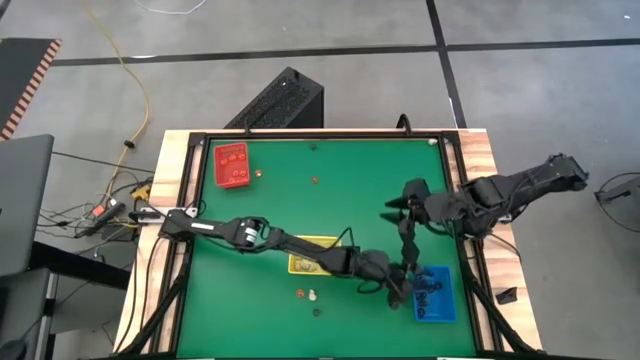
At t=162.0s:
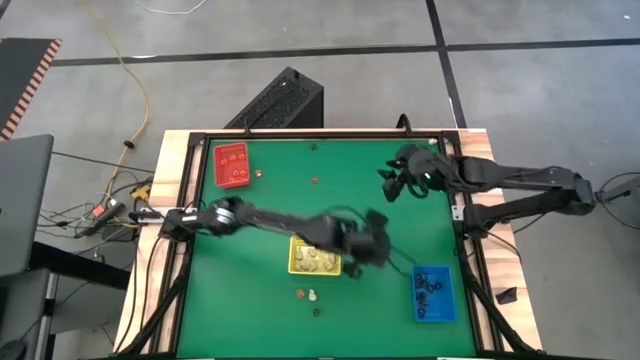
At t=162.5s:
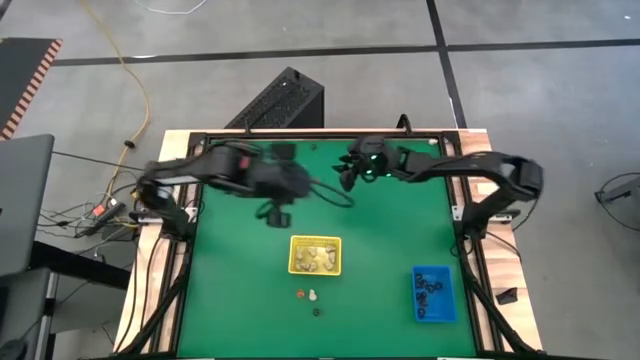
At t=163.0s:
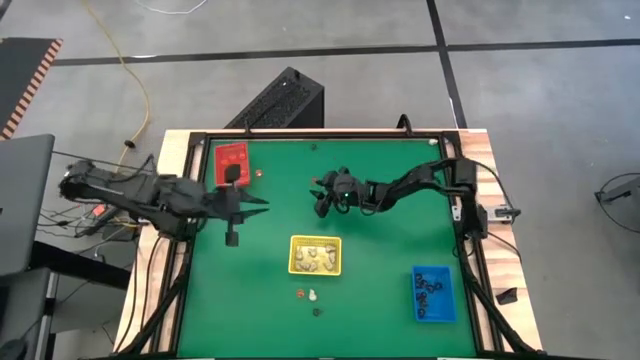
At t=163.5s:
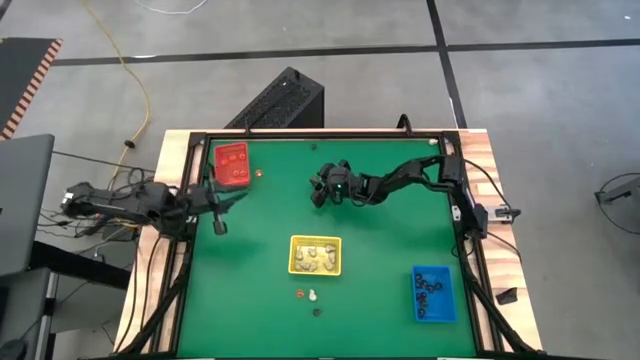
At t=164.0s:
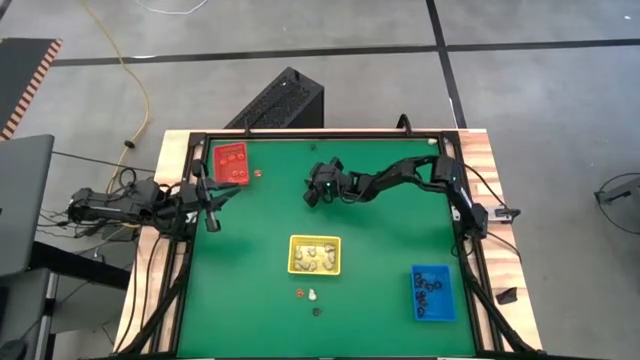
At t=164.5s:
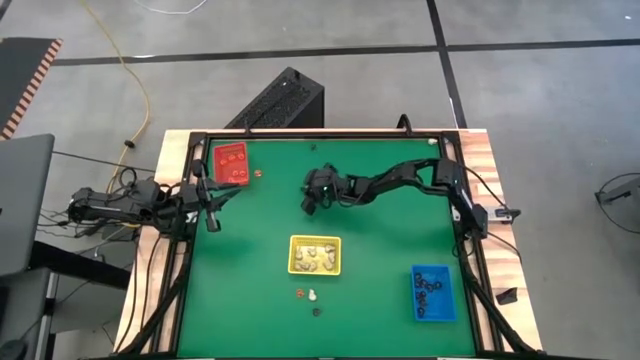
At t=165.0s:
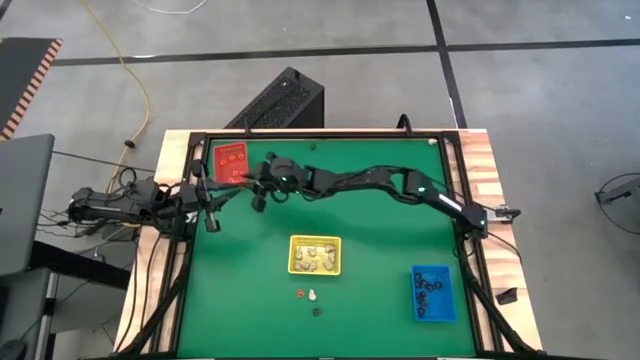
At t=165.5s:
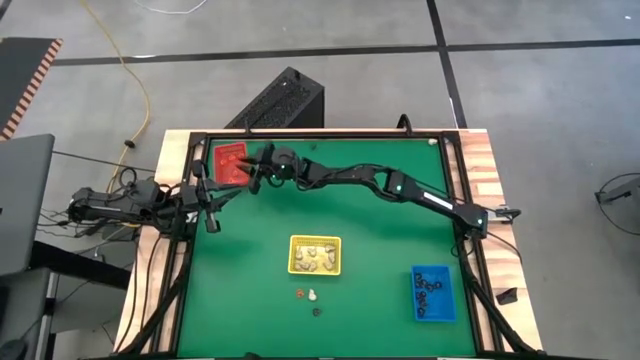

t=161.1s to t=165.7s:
Task: Sort Halloween decoration
Put the orange pumpkin toy into the red bin

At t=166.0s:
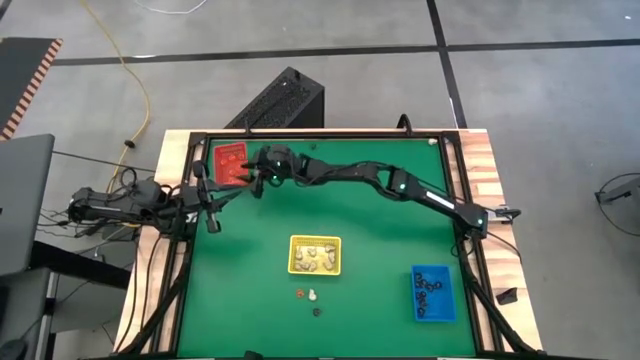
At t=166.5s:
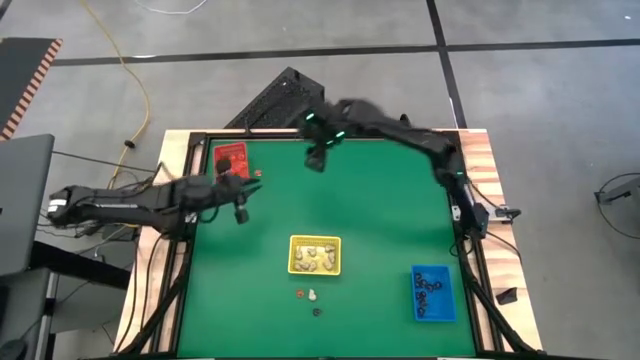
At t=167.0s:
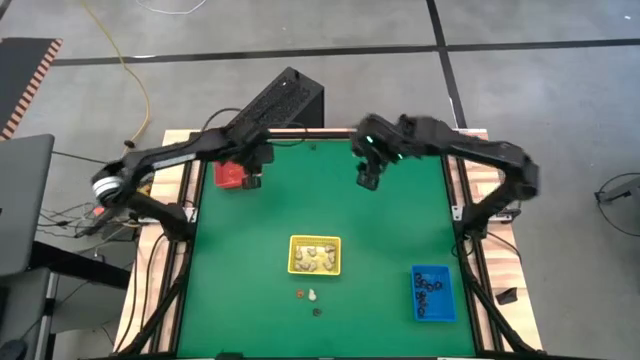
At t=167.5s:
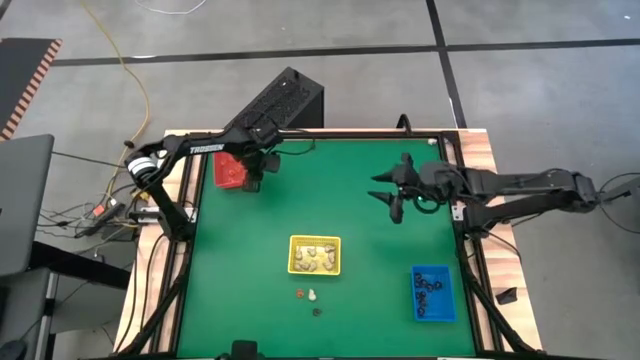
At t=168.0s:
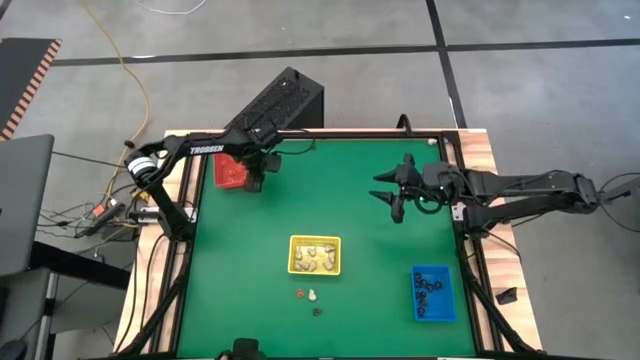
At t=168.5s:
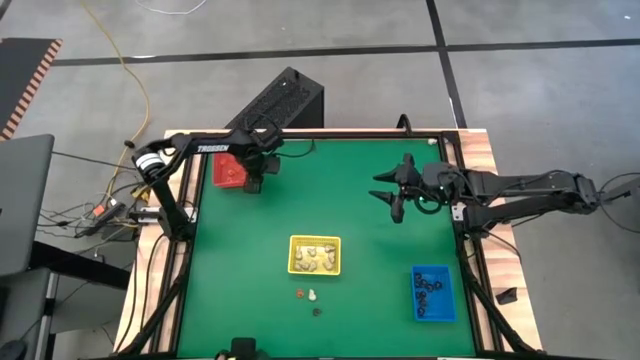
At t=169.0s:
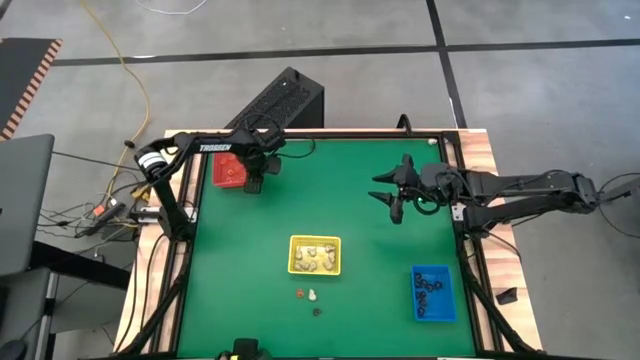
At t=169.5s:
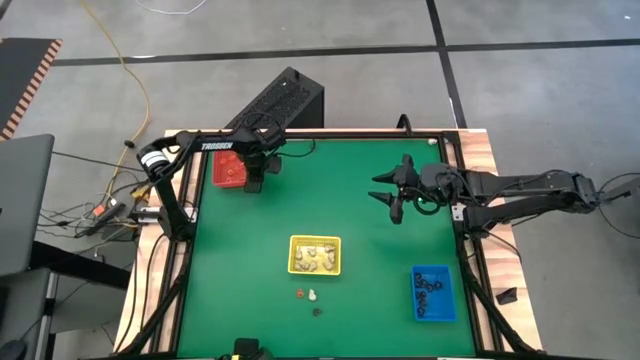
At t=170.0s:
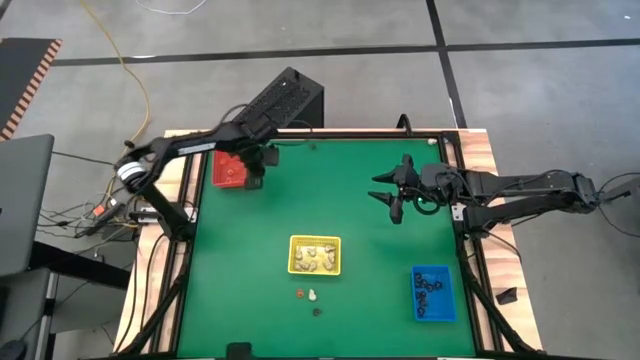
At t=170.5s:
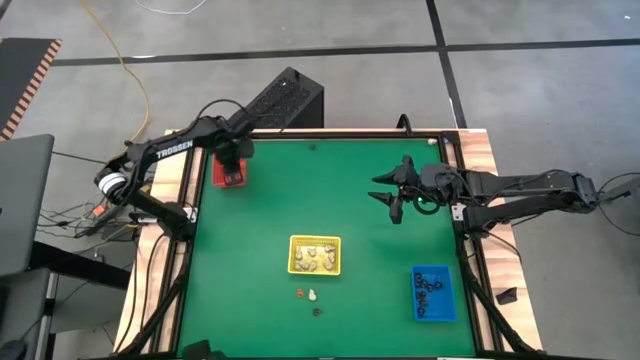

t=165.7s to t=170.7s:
Put the orange pumpkin toy into the red bin

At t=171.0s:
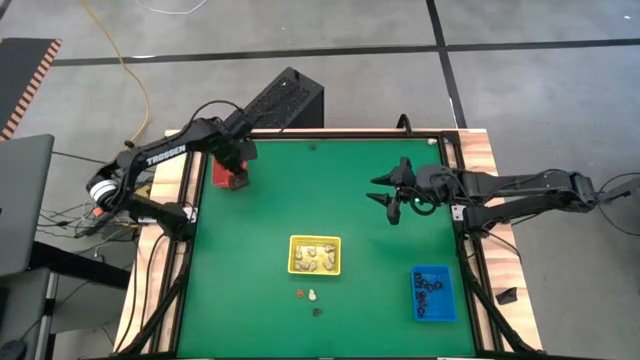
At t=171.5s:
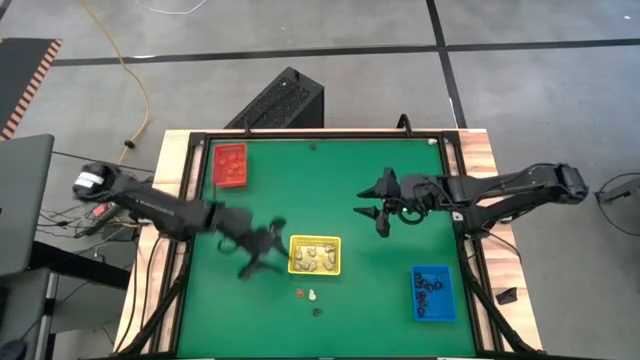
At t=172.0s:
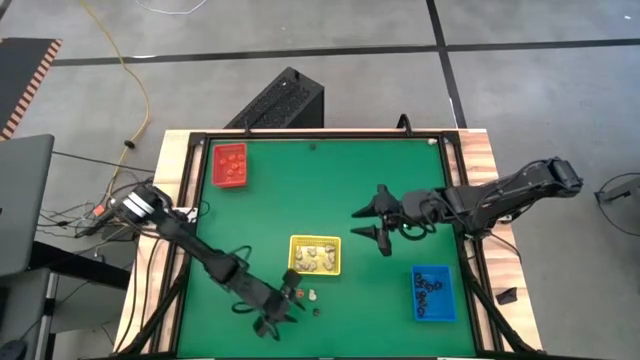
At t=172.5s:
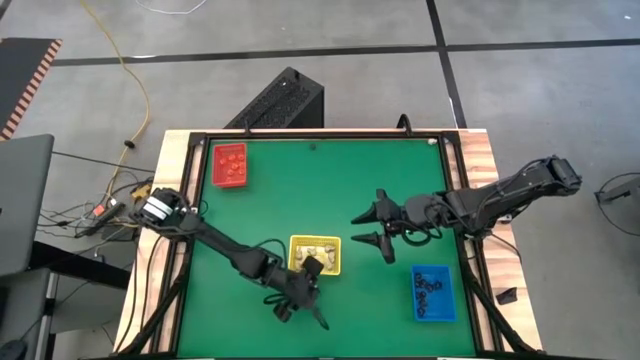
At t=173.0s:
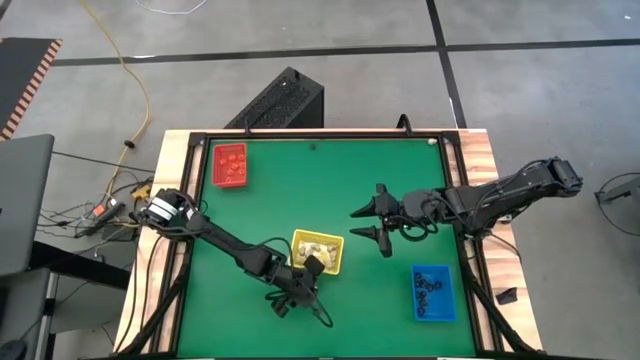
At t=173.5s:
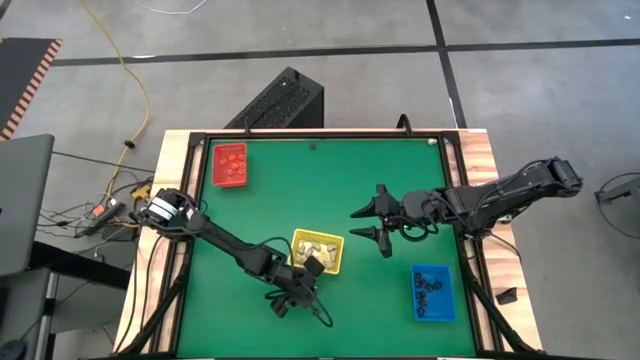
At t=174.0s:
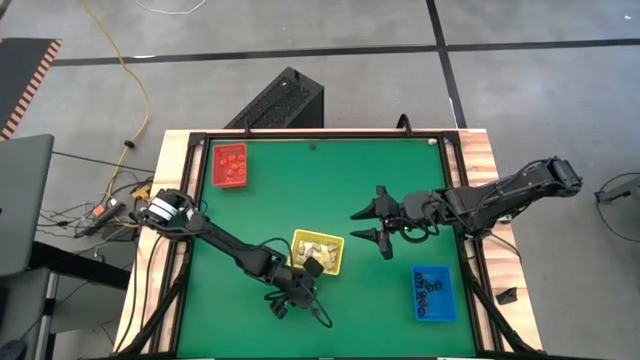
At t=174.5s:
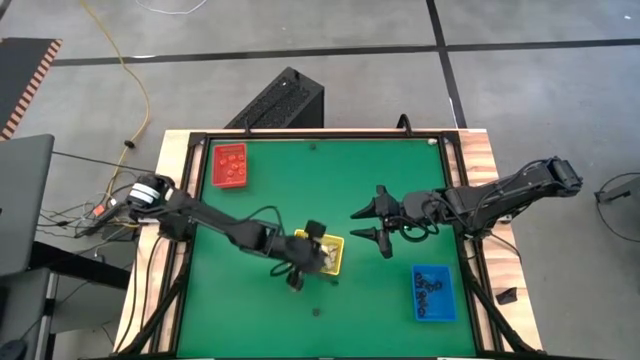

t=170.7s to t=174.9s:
Put the white skull toy into the yellow bin

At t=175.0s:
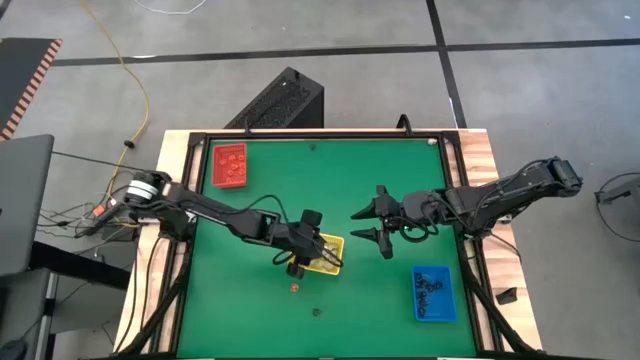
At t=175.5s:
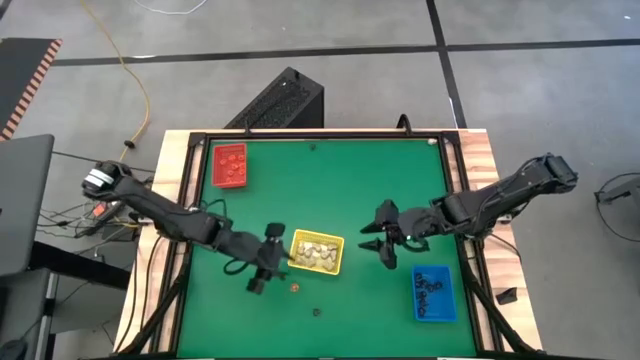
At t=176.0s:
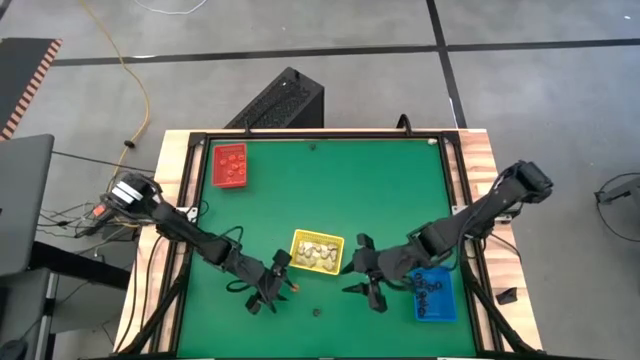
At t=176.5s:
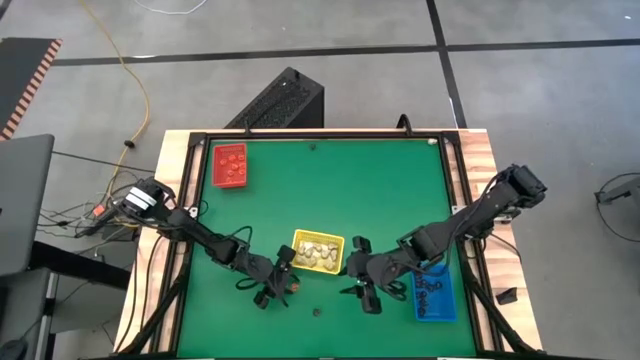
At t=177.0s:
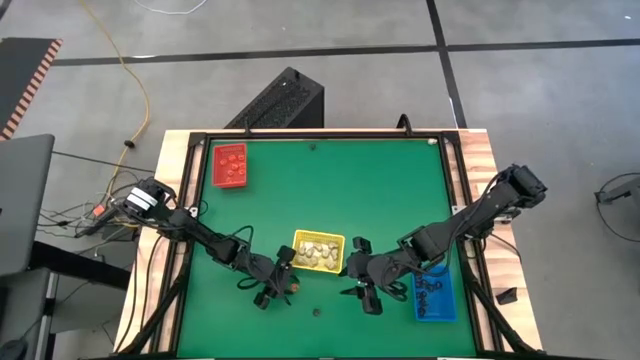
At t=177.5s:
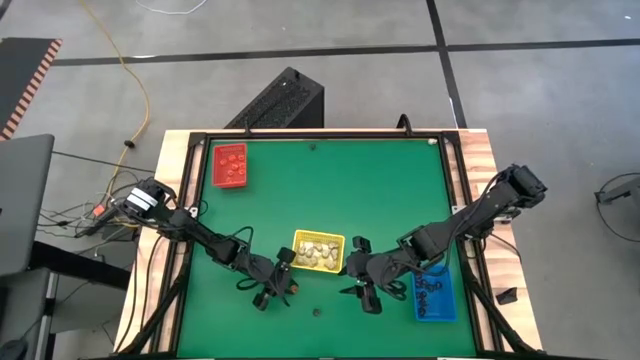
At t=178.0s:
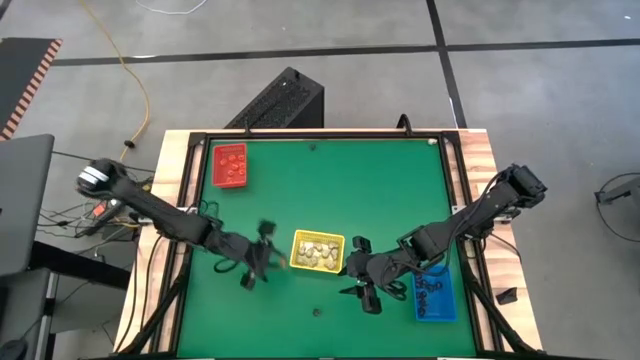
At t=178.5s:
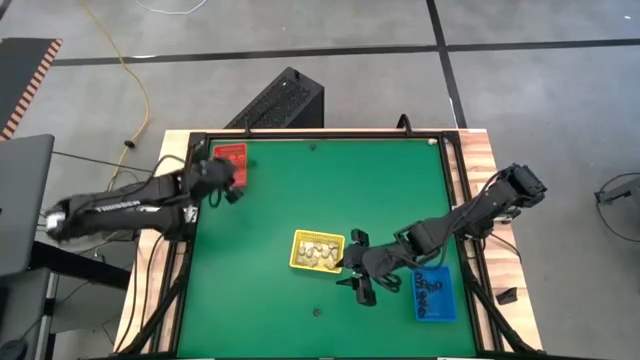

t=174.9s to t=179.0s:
Put the orange pumpkin toy into the red bin

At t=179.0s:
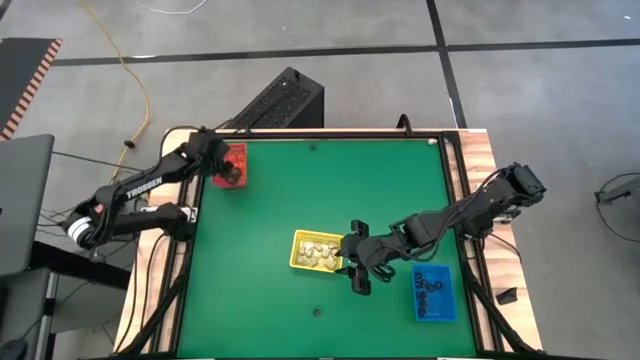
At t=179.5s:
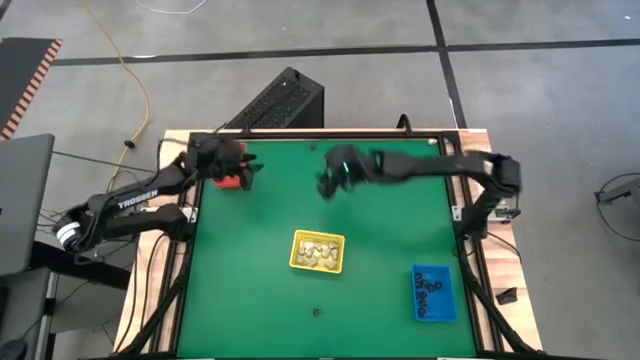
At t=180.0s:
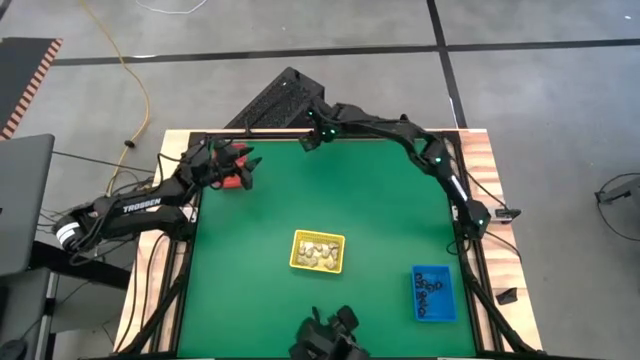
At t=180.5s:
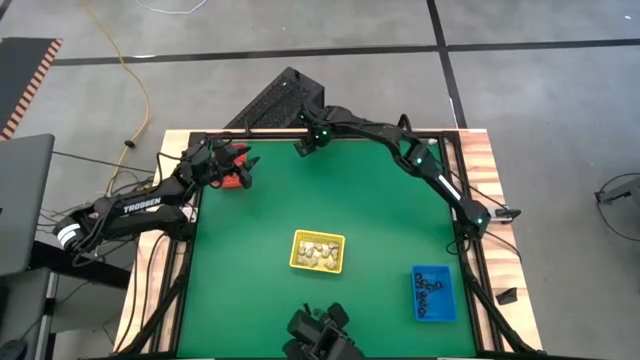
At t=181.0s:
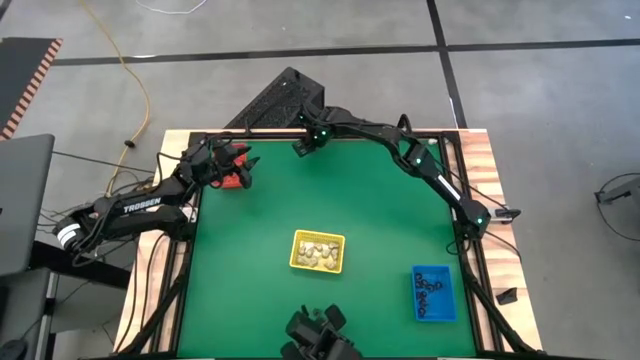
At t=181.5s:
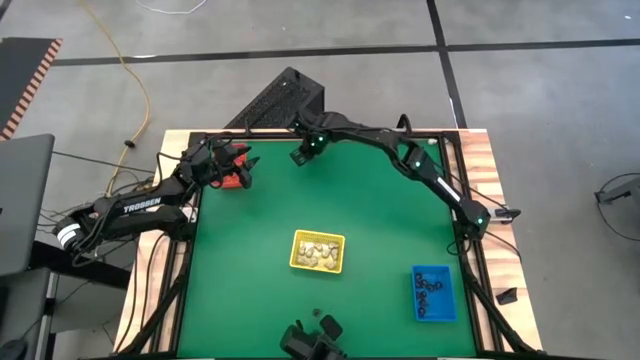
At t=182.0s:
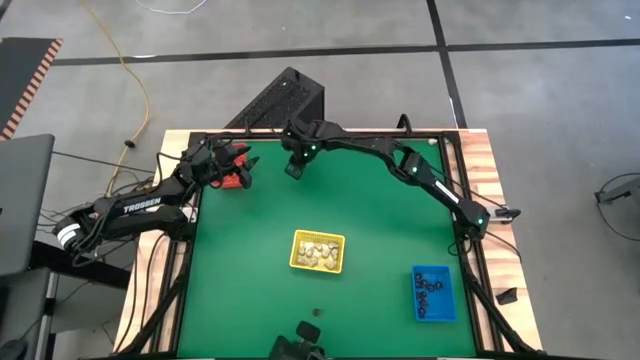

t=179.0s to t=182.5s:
Put the black skull toy into the blue bin
